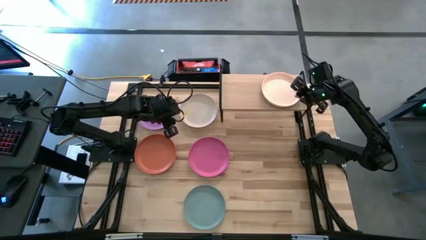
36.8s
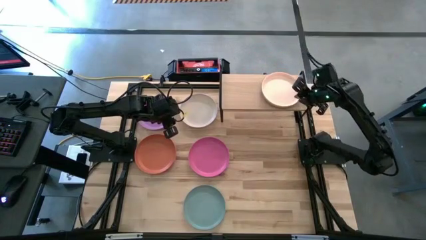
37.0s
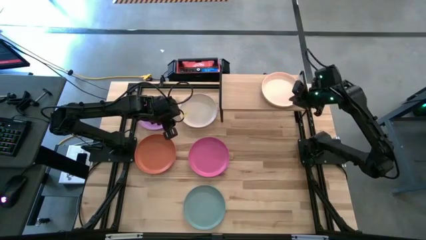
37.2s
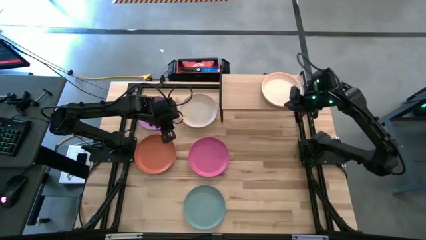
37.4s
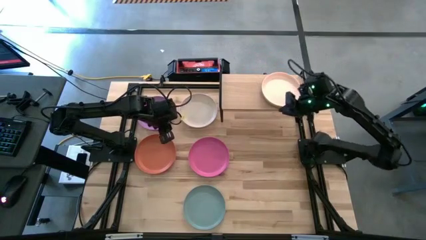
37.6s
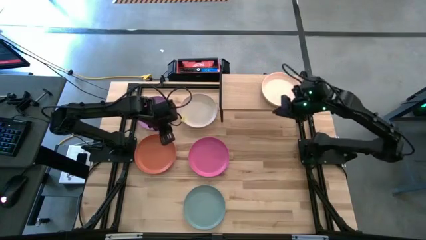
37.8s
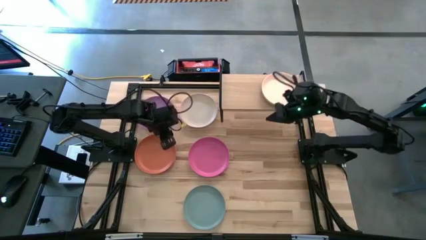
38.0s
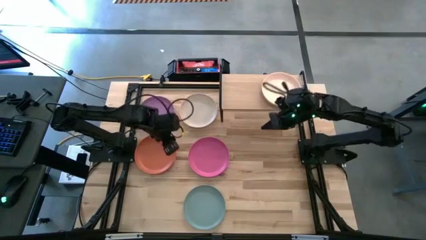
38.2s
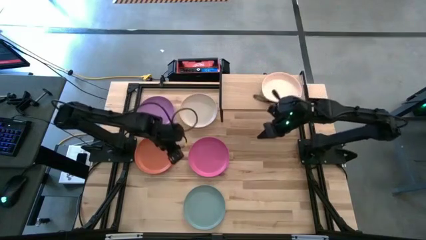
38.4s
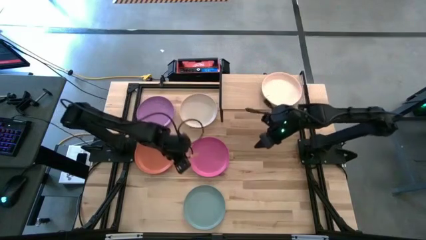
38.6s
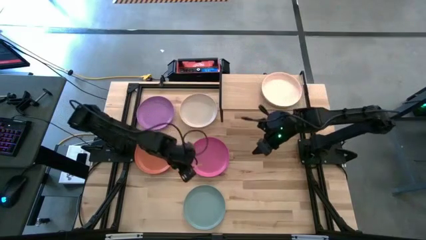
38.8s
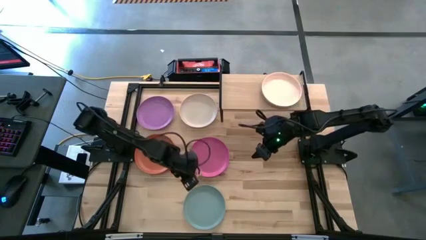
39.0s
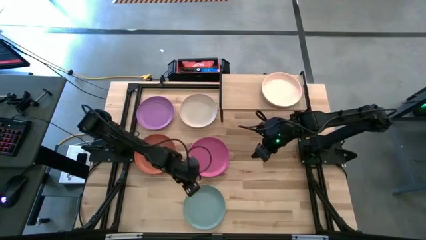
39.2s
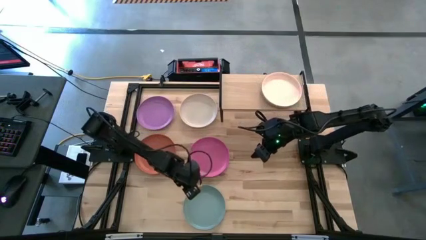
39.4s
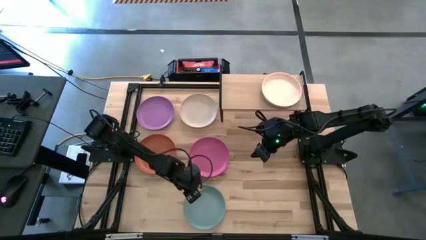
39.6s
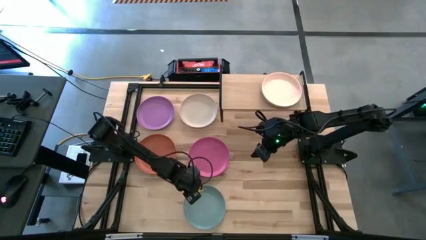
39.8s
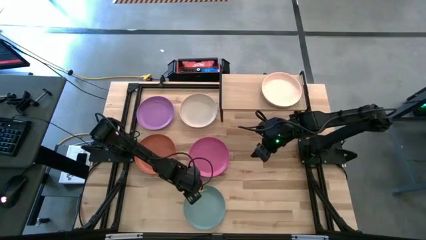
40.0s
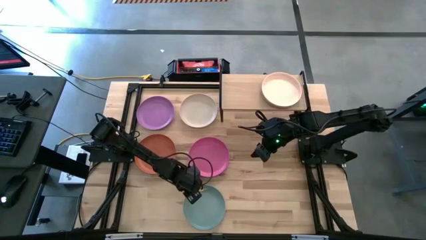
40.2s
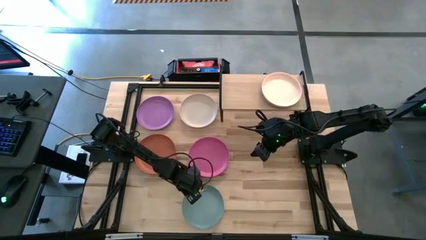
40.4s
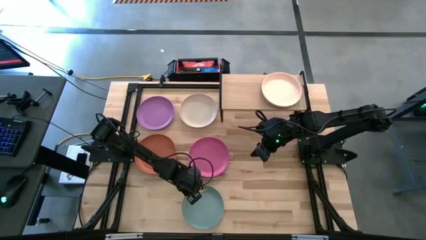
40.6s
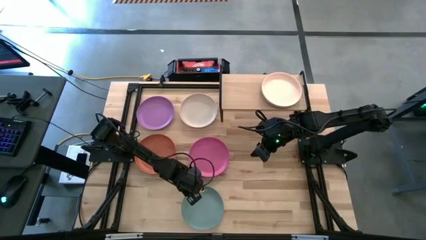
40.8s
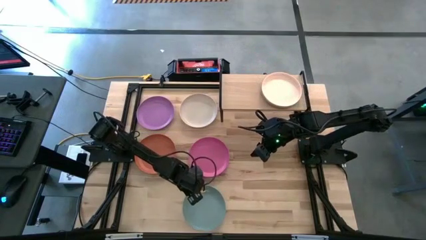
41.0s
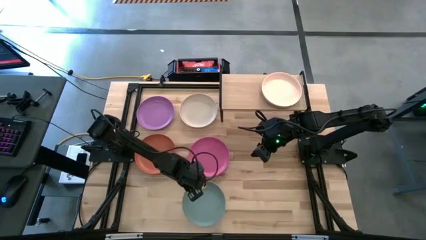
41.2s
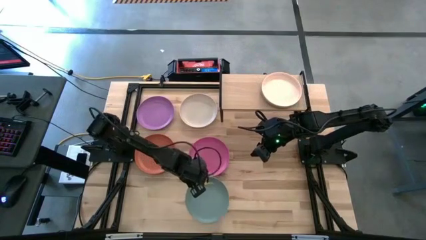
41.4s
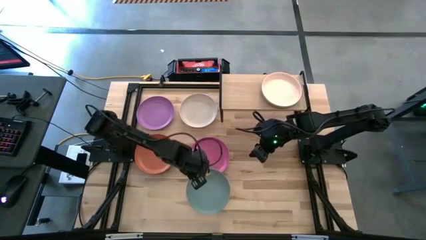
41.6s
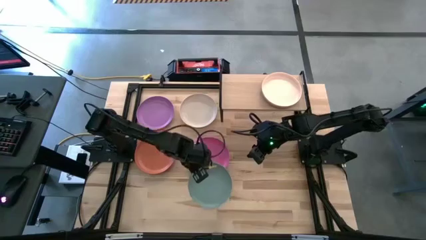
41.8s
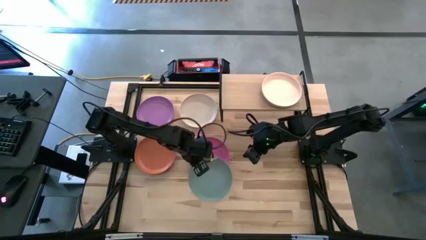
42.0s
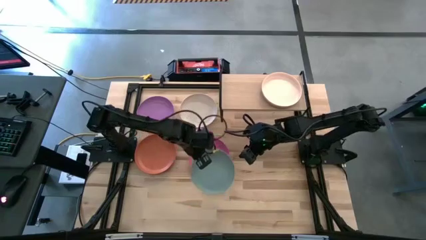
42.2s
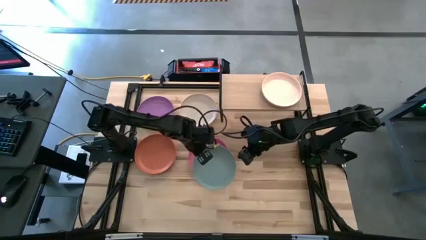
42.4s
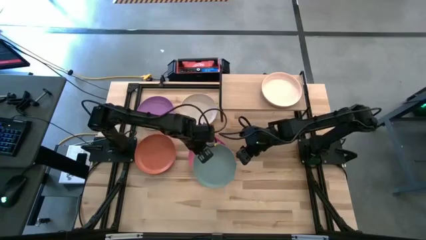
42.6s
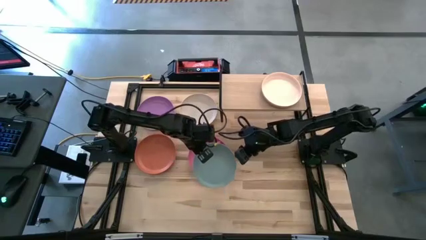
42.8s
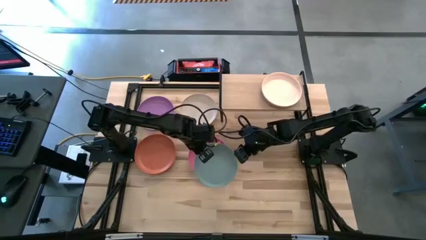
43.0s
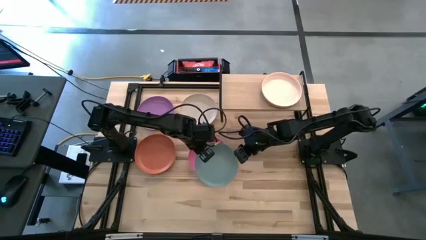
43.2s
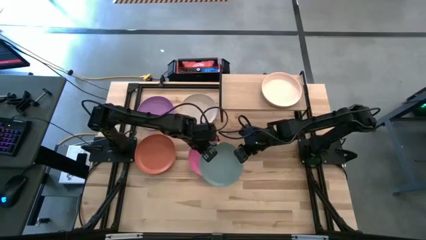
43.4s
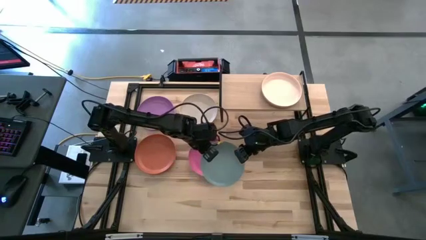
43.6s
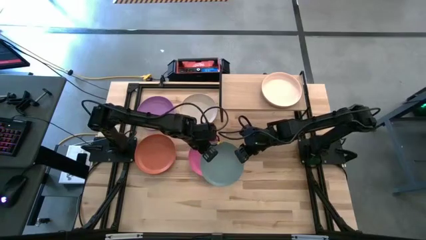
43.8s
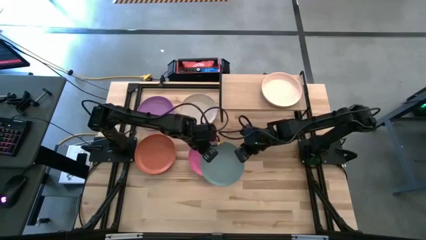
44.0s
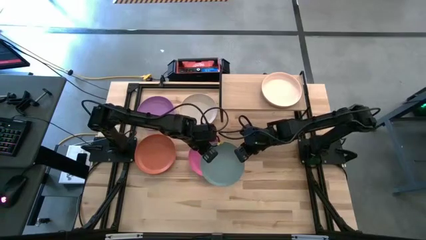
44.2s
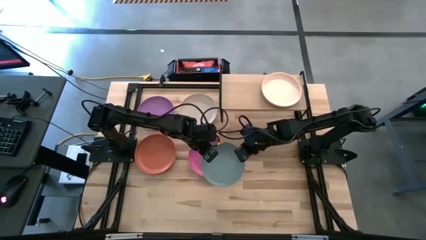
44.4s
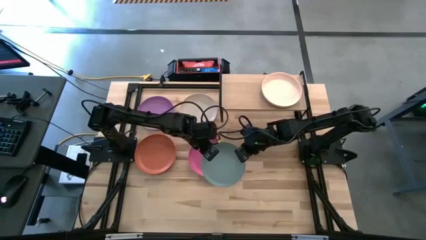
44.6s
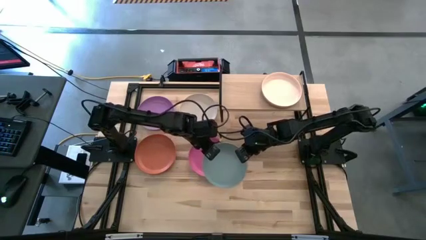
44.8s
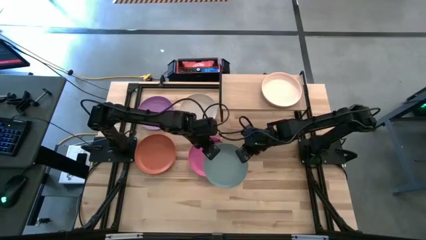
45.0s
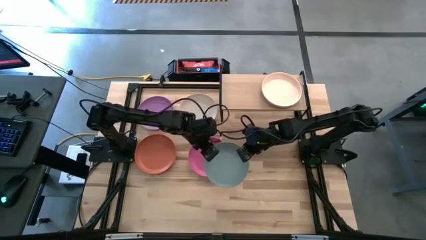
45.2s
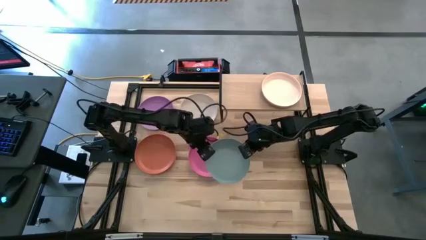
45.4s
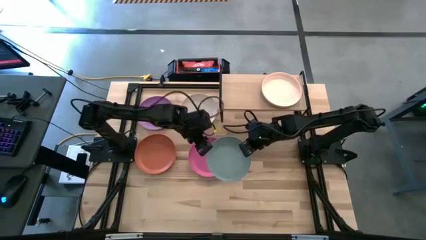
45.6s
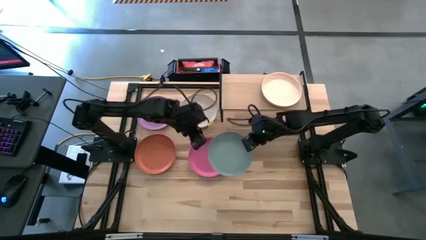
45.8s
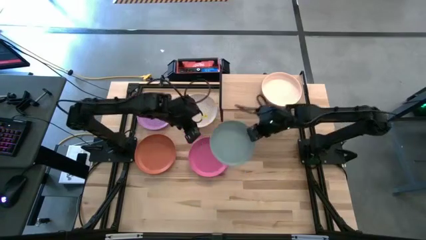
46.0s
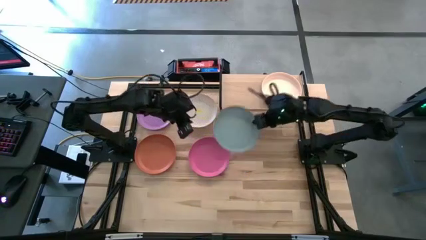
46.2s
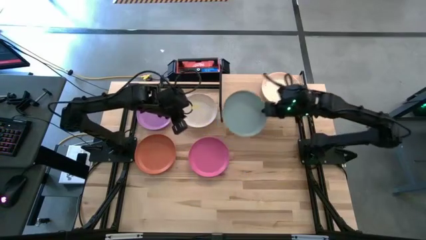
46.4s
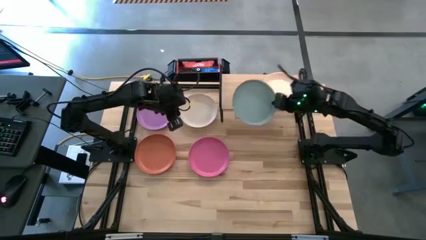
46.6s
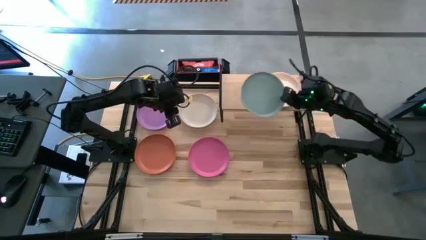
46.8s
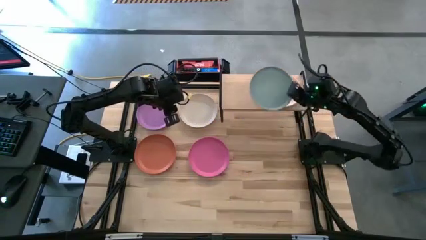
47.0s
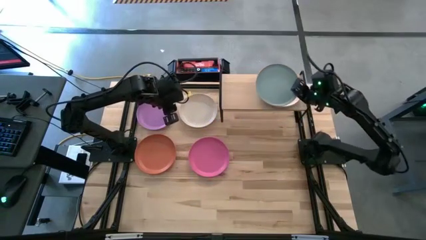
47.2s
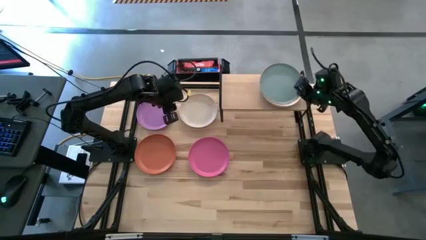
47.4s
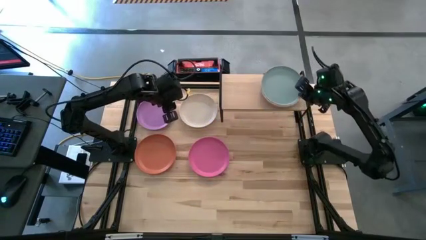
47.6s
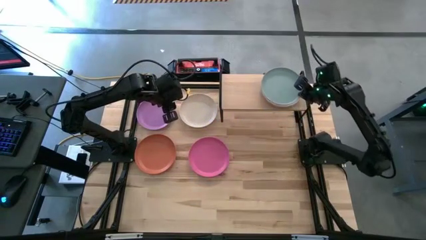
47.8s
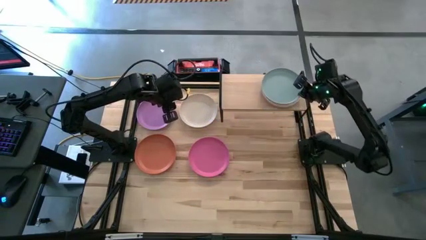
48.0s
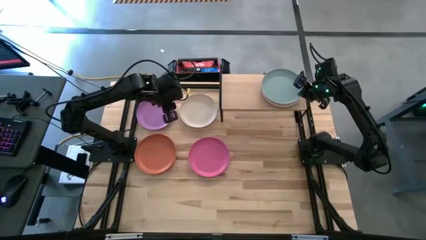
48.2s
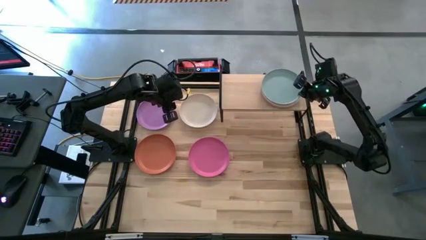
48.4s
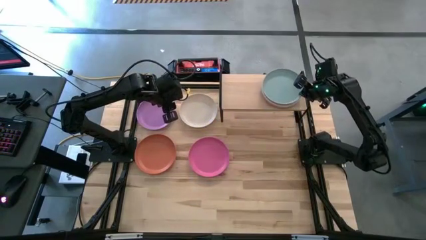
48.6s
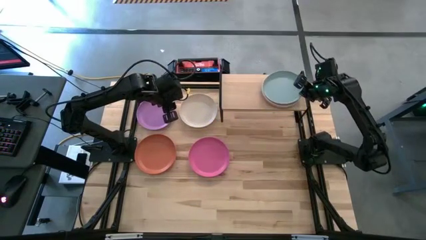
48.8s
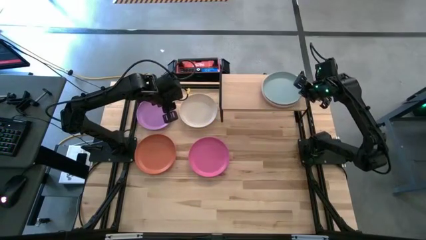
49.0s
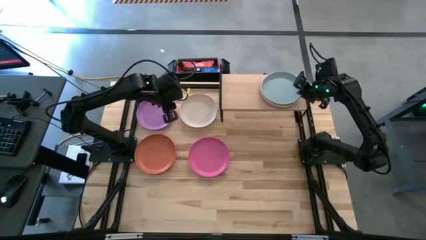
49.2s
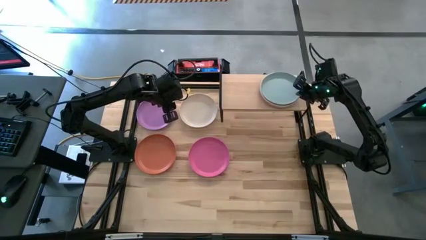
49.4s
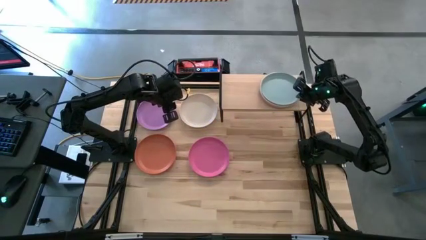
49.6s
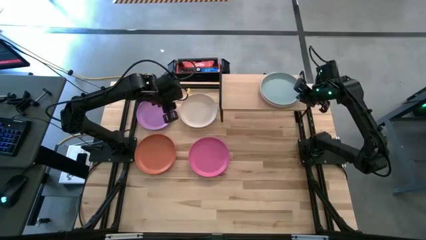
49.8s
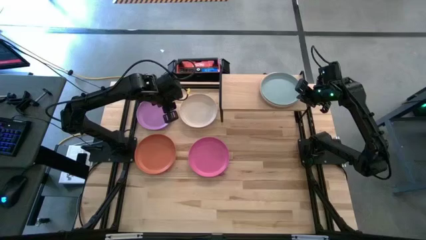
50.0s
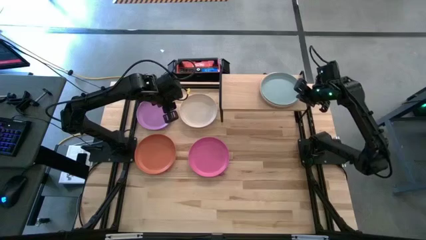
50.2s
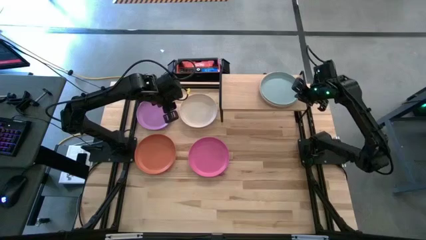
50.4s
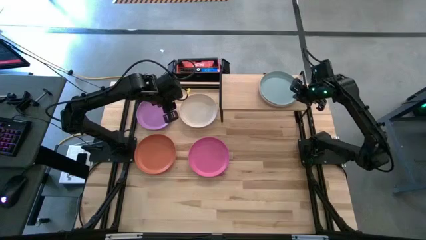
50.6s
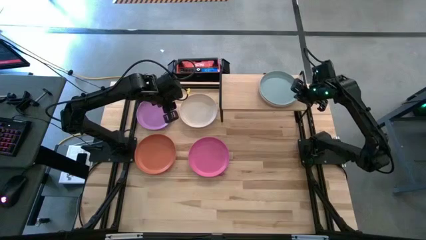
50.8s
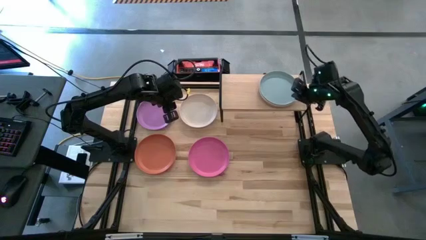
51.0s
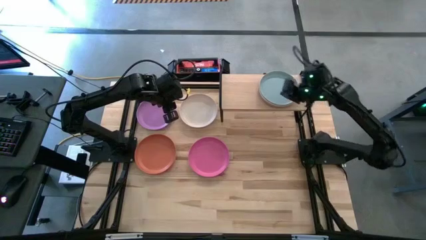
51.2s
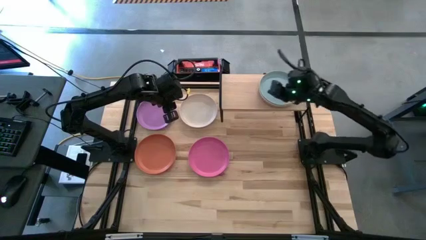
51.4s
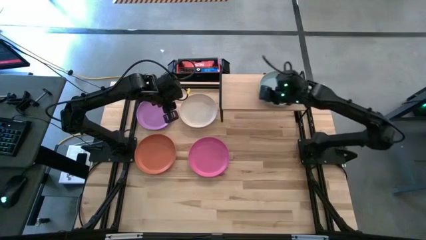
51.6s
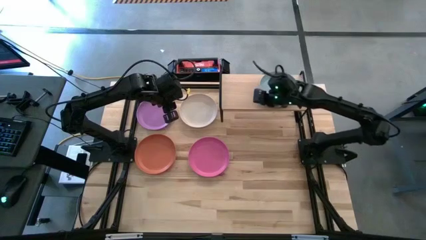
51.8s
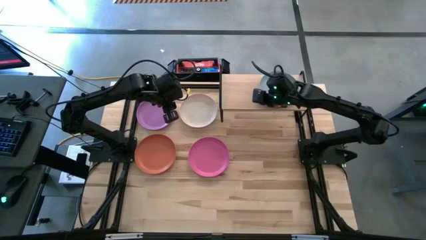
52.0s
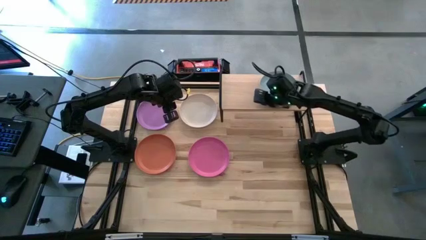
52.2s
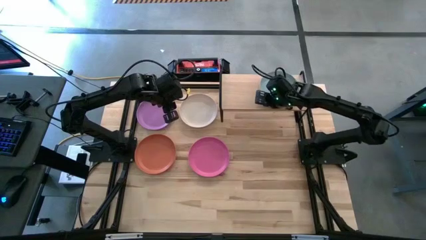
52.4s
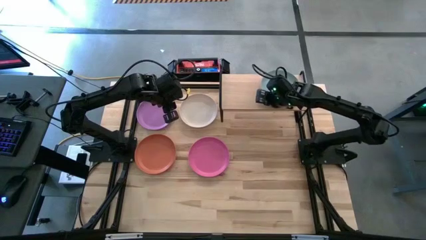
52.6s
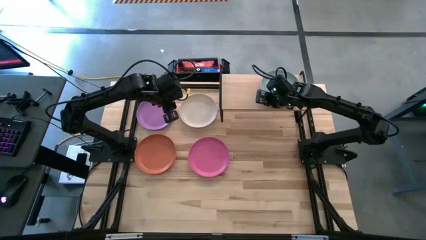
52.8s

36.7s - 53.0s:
Task: Place and stack plates onto a shelf
Stack the blue plate on top of the white plate on the shelf
